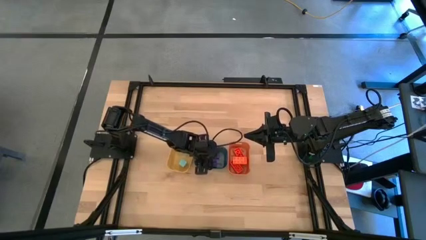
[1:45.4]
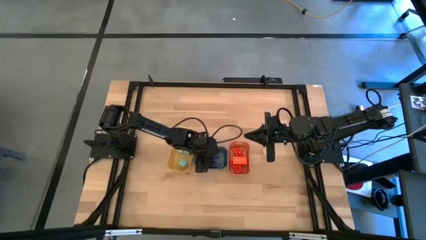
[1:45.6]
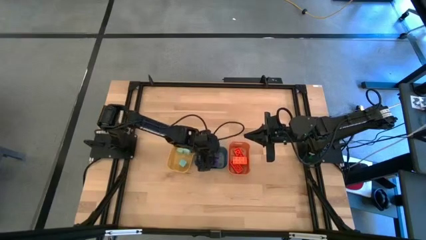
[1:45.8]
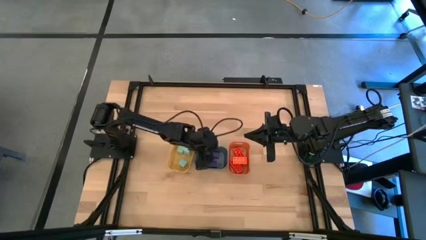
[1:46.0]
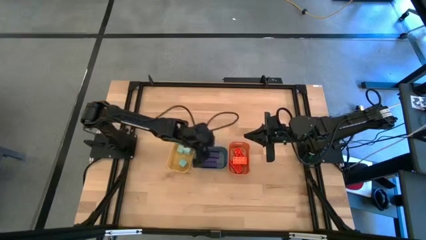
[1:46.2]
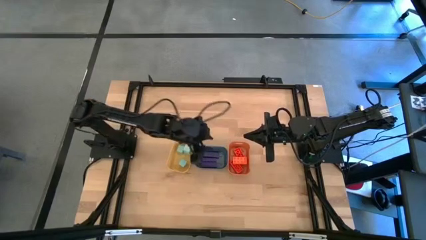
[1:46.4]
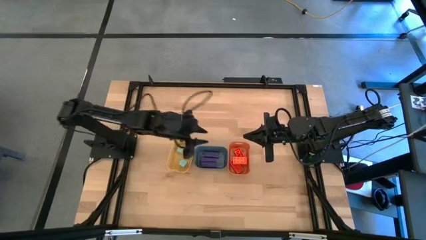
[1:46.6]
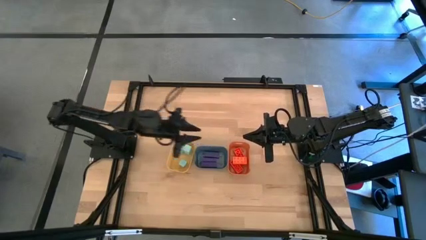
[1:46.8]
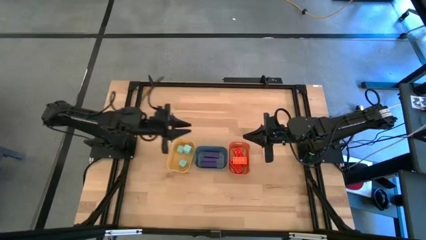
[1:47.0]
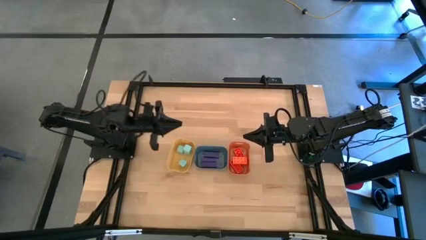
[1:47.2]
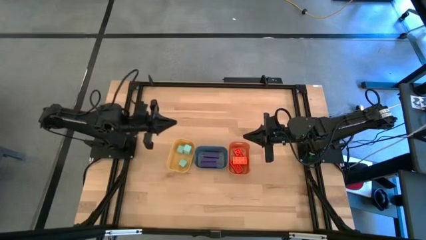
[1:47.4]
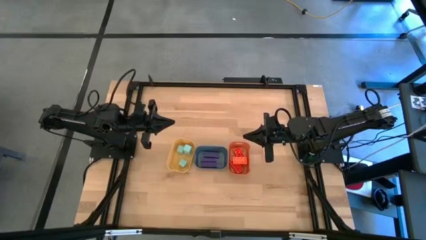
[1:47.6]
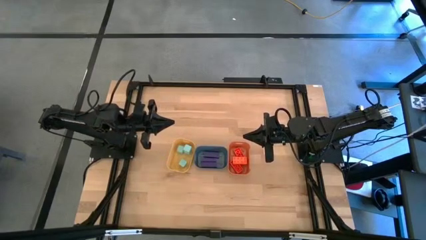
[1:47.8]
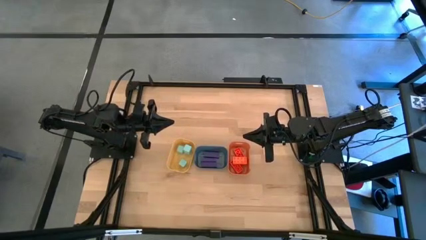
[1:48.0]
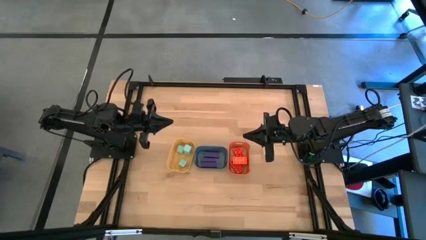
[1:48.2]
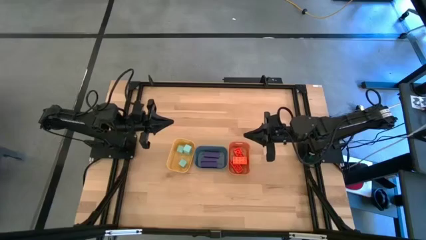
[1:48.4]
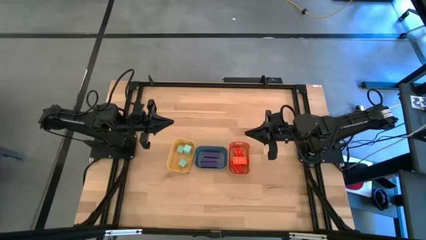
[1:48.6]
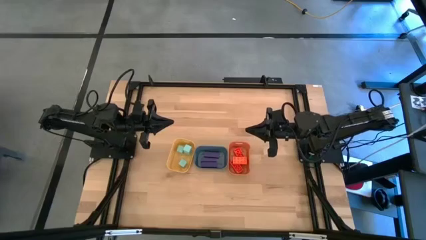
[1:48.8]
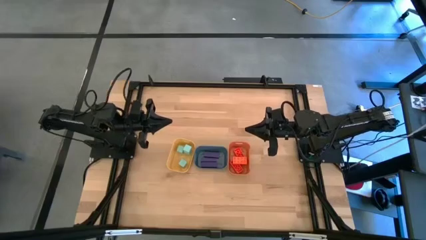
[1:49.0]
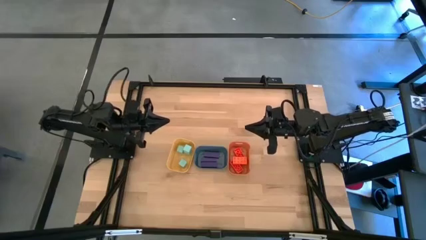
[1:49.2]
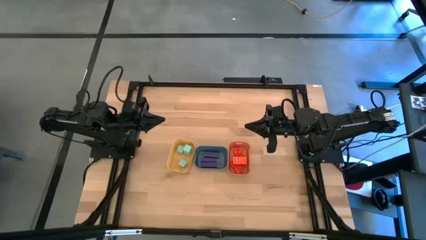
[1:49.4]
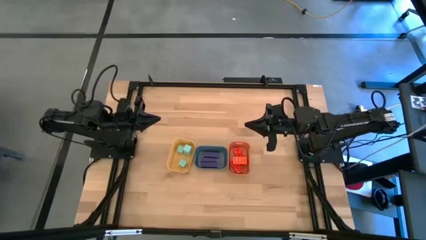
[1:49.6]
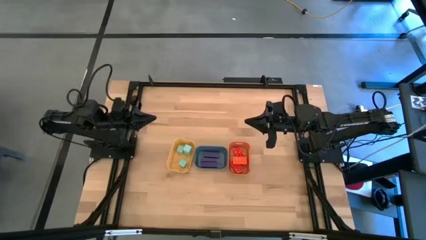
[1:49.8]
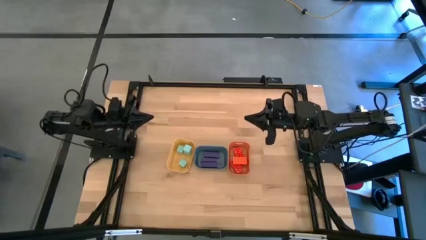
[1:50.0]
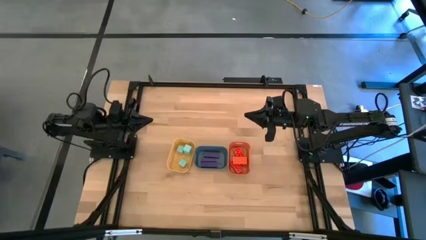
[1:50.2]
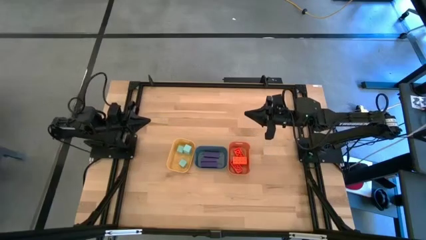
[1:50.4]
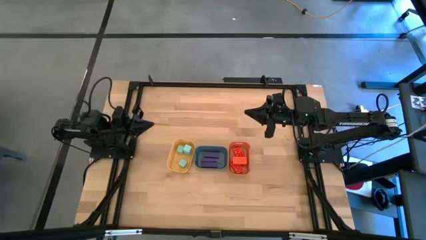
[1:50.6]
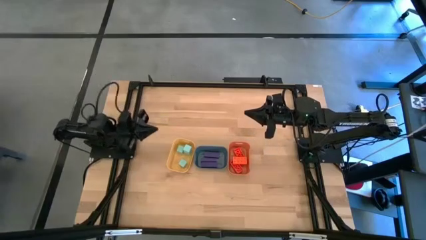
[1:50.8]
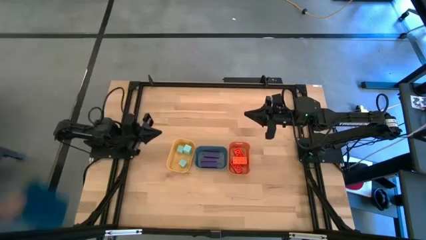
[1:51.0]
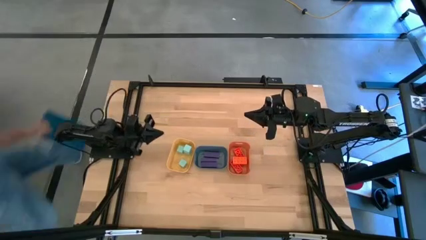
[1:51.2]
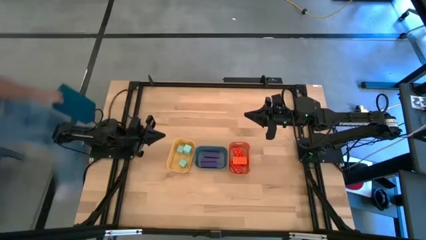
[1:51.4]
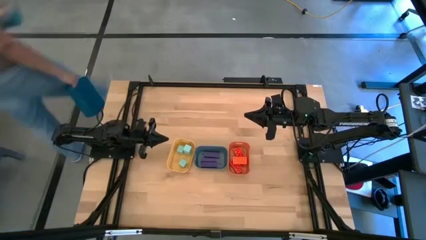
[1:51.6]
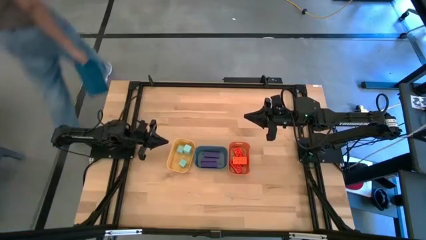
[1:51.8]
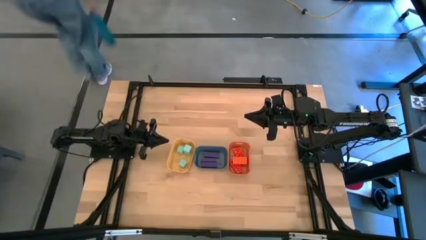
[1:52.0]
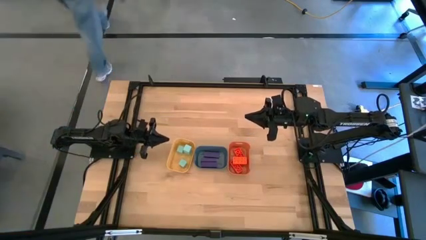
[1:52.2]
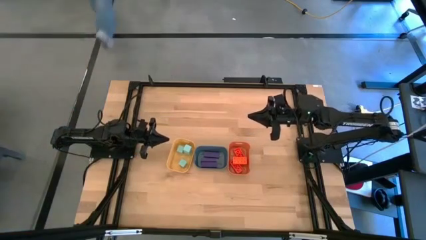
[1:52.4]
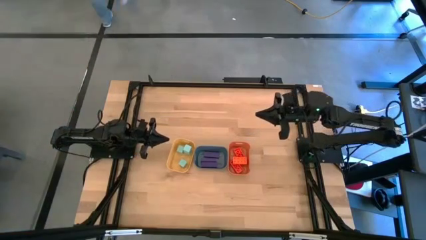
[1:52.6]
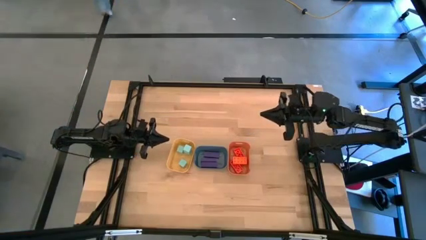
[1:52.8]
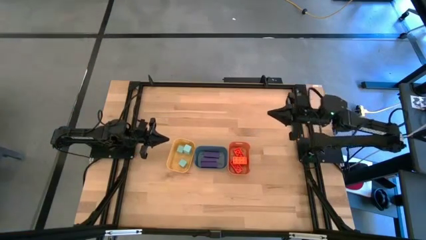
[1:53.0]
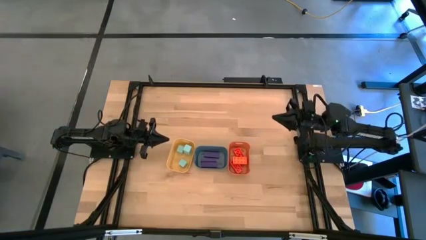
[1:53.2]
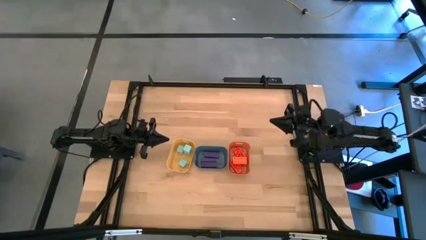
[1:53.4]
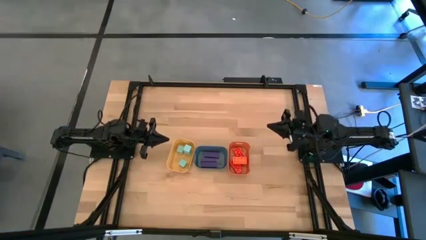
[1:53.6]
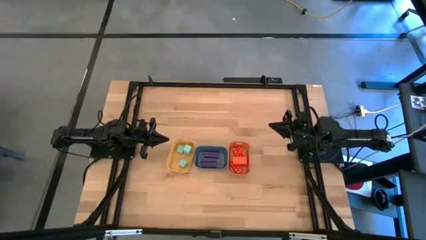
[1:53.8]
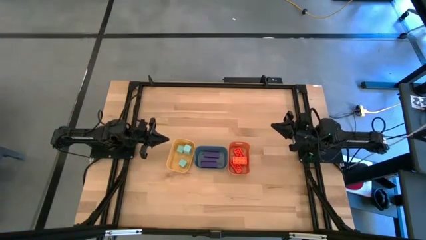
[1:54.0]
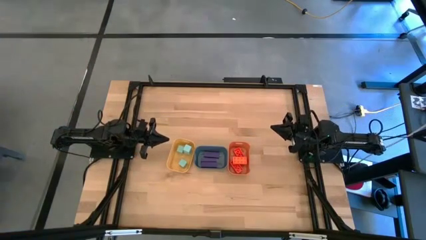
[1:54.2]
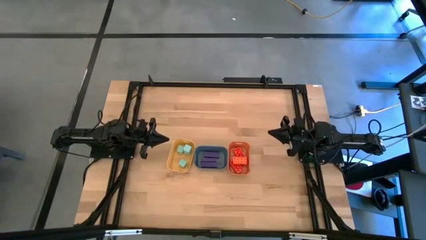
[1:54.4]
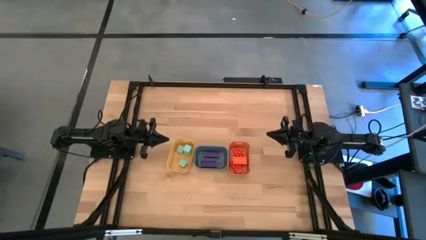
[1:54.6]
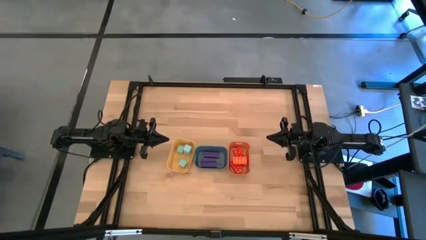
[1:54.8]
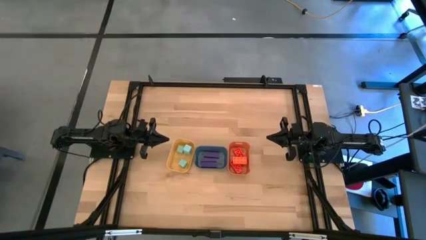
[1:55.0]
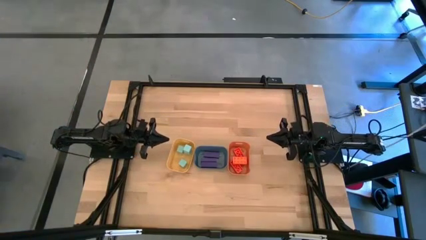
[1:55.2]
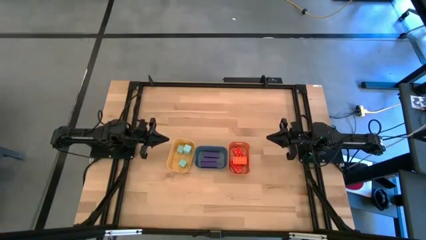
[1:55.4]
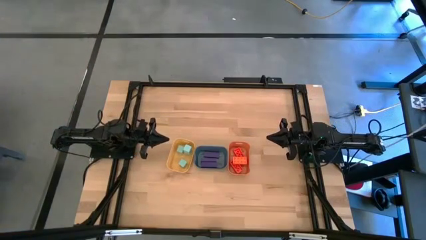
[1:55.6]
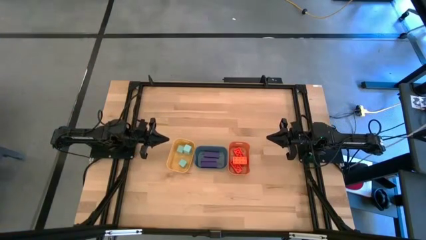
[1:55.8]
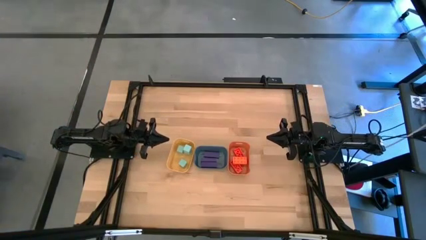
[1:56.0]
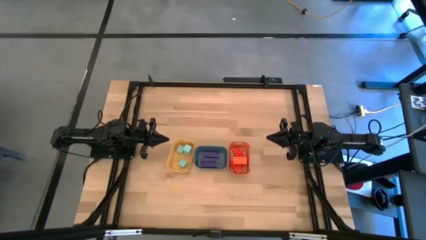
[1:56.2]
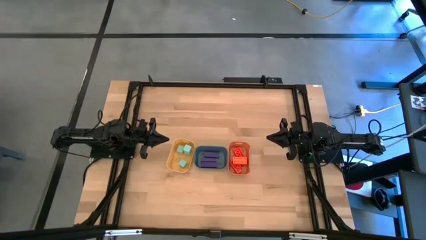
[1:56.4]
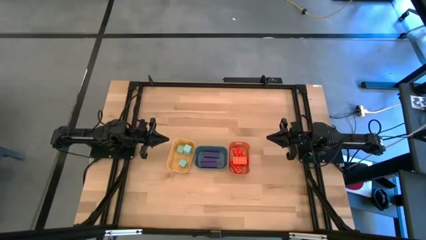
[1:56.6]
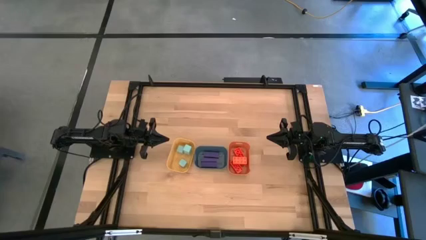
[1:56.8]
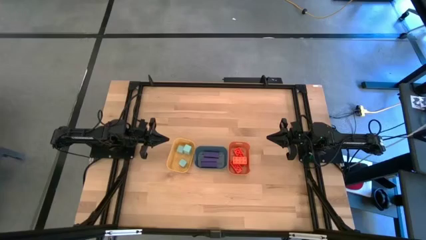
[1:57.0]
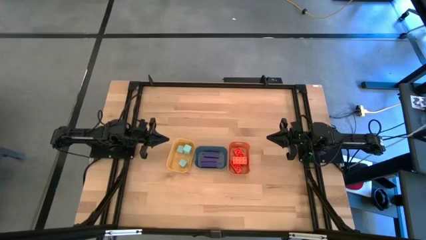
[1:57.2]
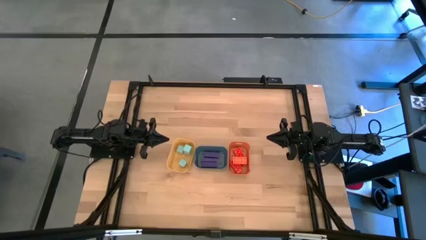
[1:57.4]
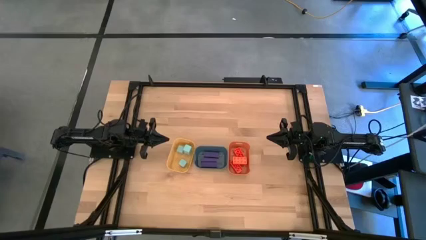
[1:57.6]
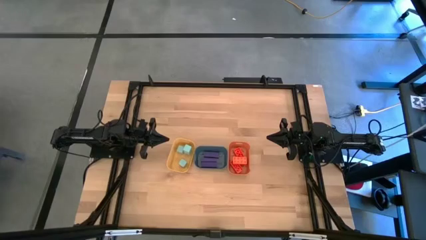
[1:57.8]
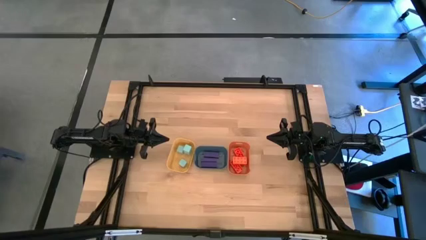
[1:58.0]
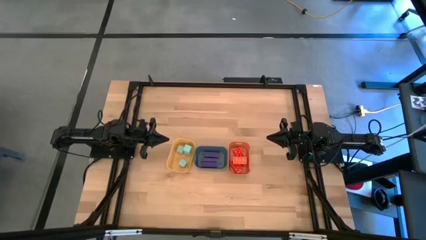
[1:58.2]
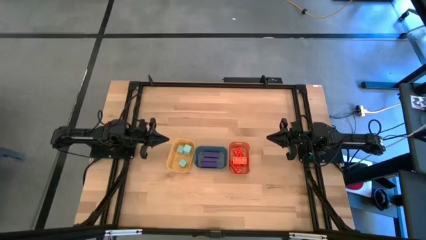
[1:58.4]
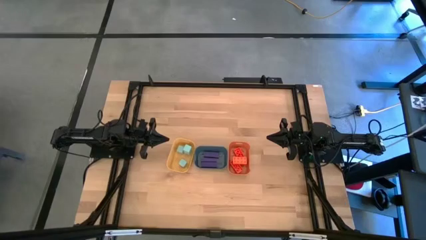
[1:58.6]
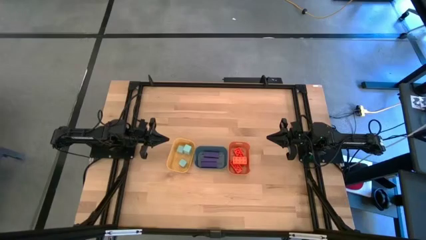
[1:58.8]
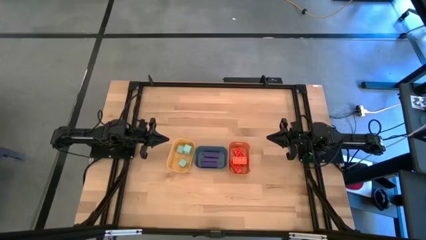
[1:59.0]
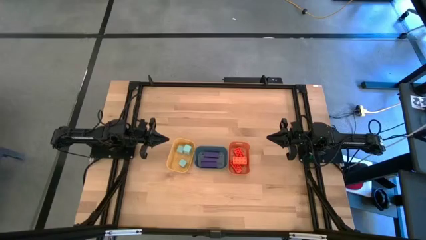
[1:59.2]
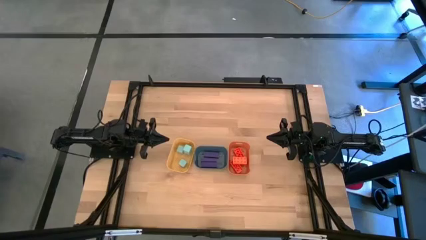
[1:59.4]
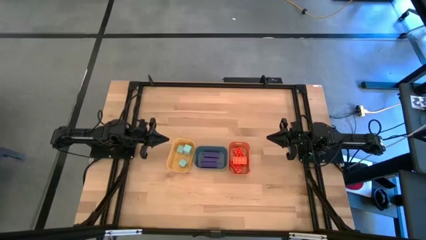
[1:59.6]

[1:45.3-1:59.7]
Task: Sort & place blocks by color
Return to Home Position

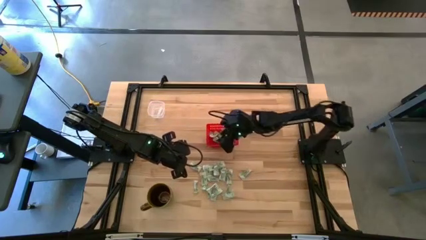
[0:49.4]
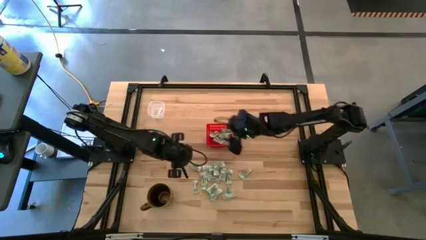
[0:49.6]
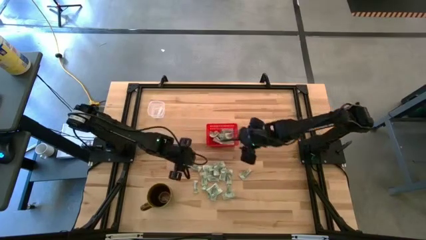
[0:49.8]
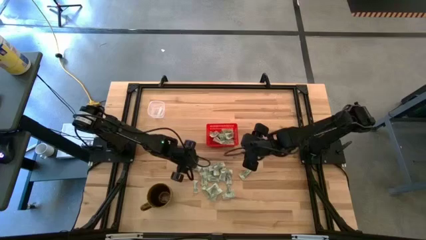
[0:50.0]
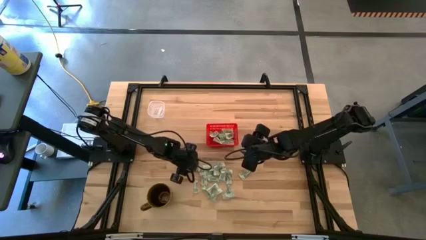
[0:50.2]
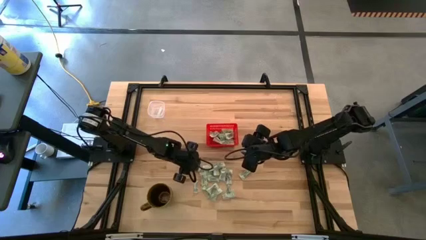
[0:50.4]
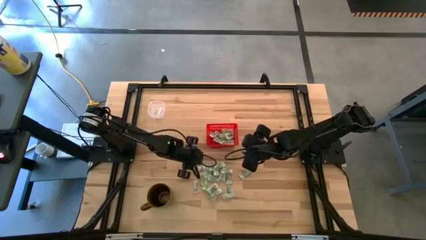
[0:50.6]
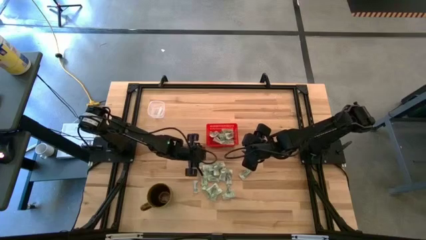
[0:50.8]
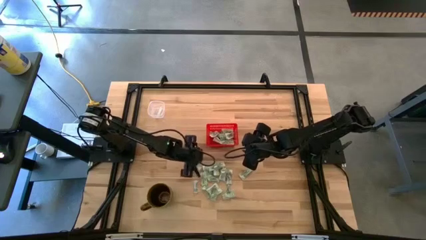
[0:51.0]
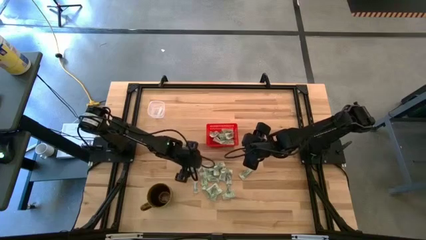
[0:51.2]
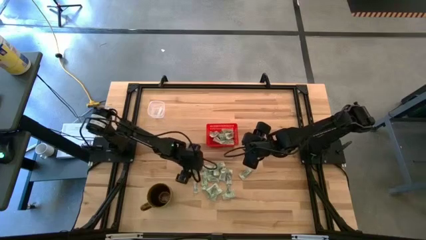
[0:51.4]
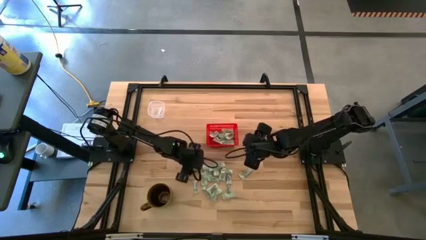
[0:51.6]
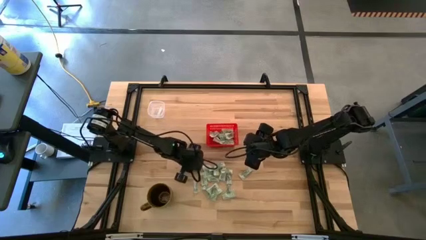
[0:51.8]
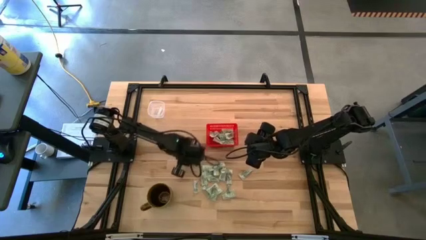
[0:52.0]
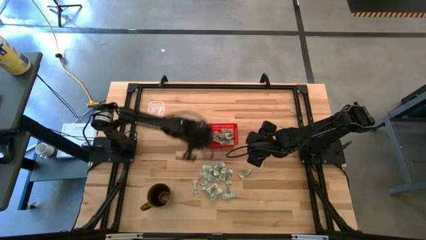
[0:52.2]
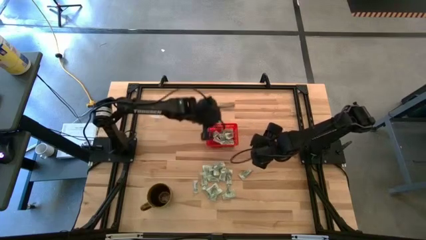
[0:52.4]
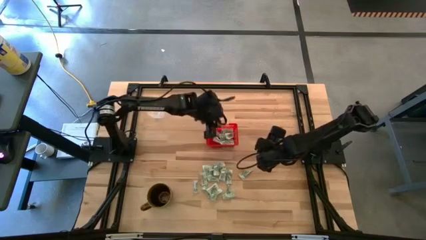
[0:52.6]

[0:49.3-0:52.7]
Task: Pick and place items into bin
Put the green stevia packet into the red bin
